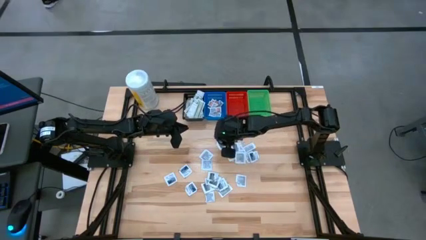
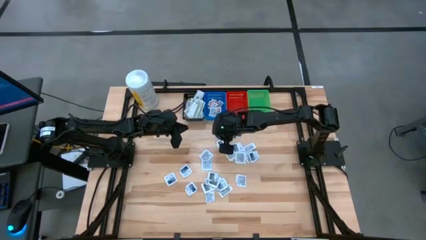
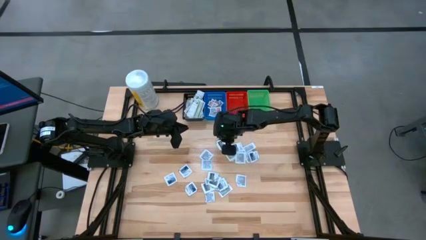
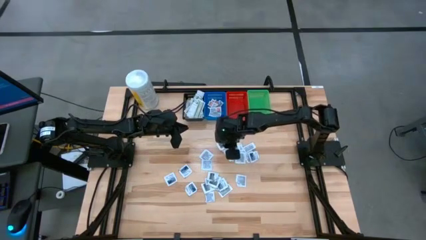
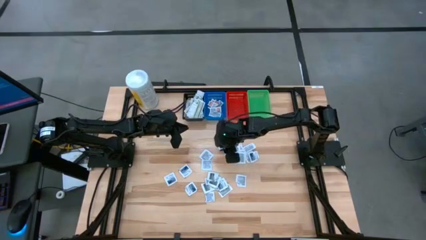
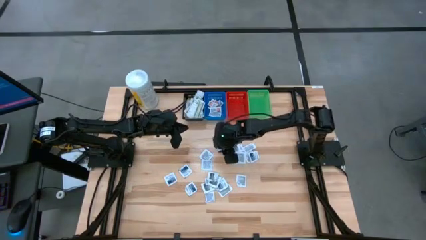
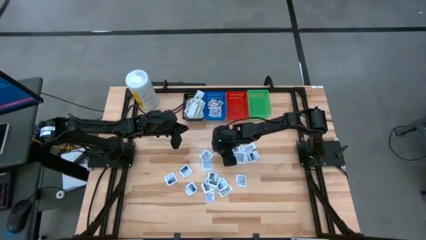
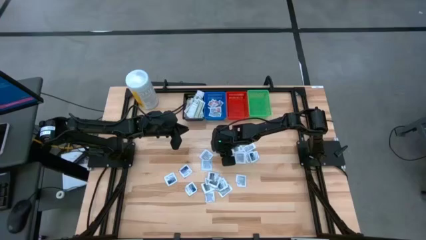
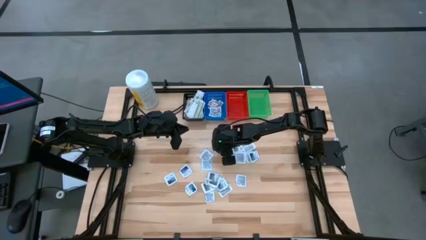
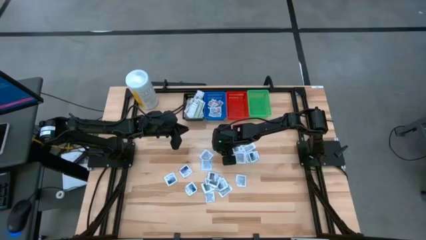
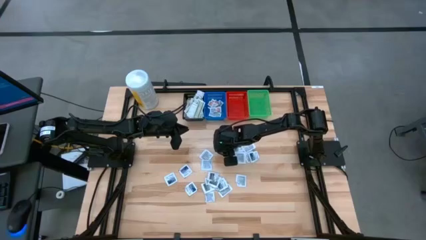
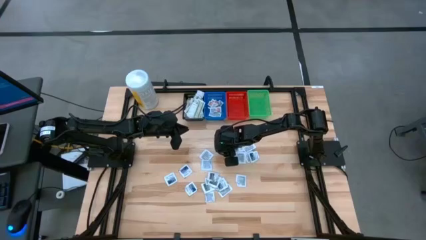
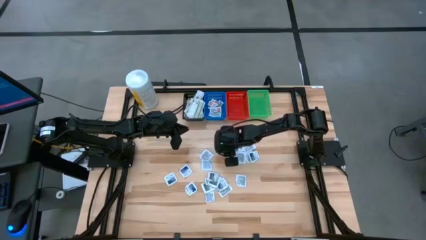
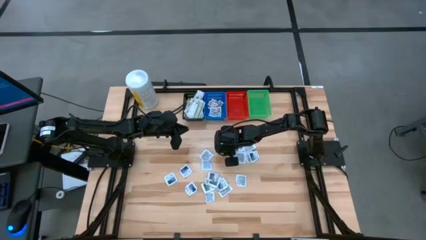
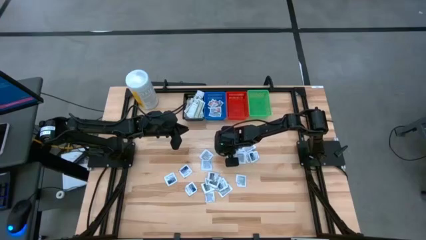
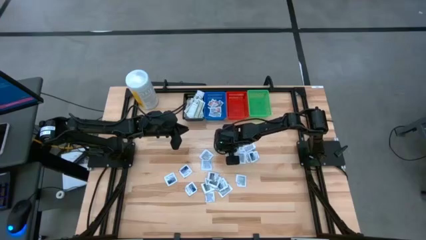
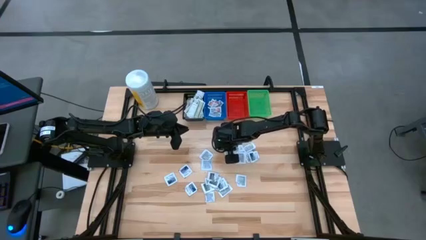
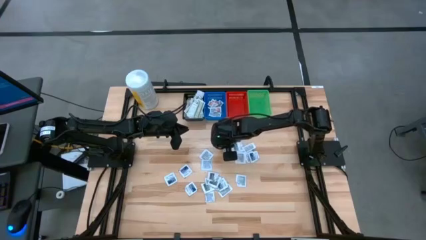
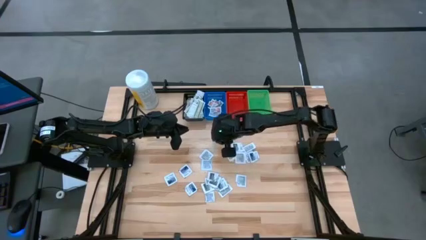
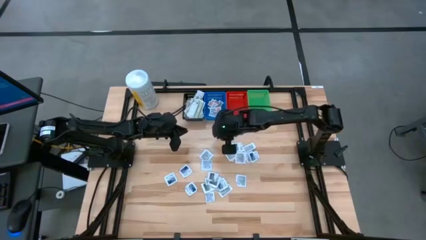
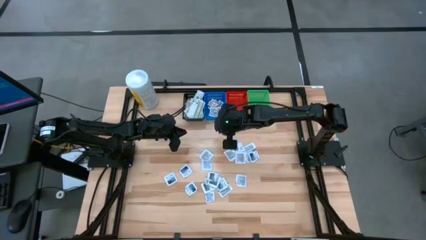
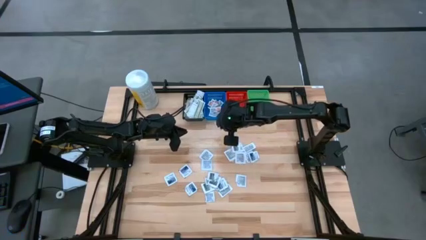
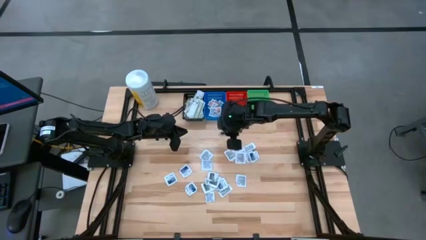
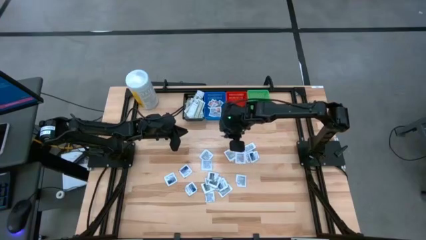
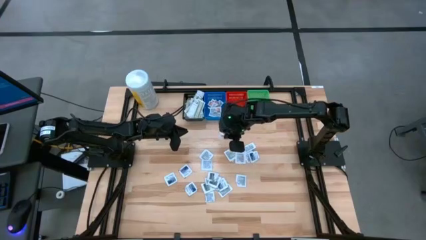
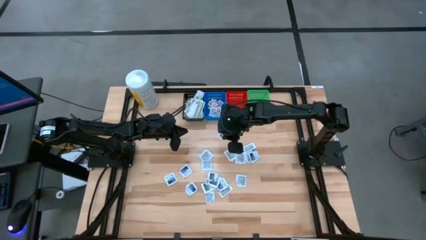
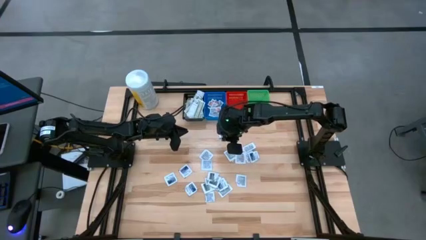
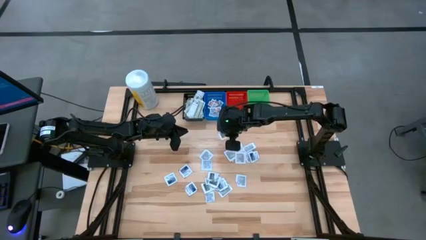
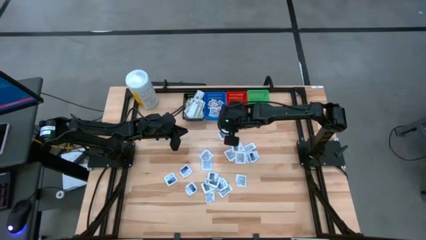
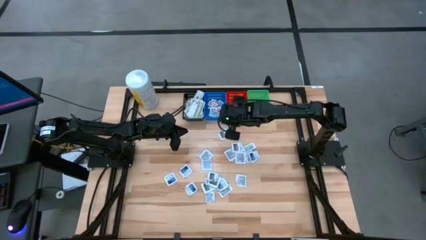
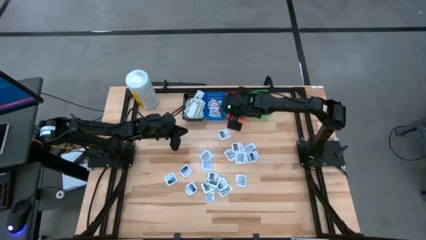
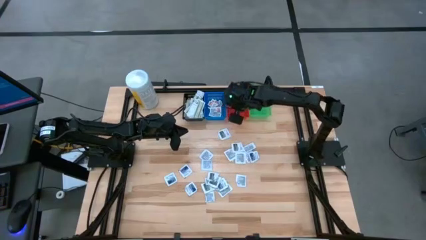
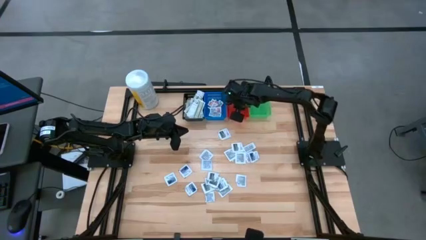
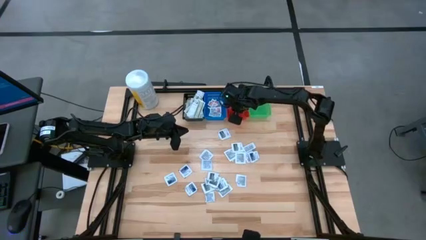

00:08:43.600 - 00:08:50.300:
Task: Pick & Place First Aid Supplies
Put the gray towelette pack in the red bin

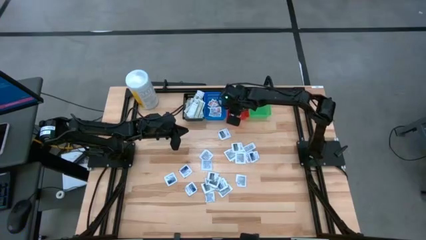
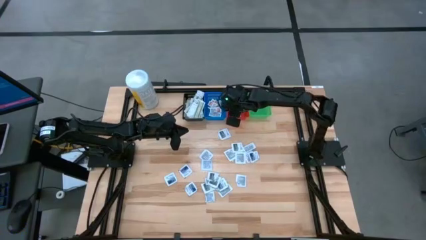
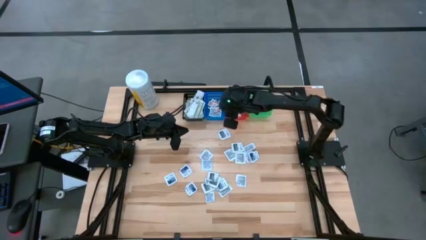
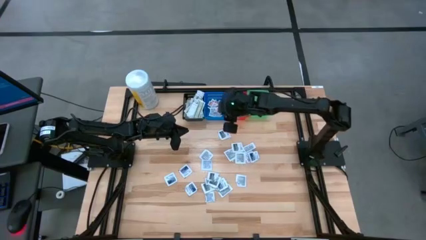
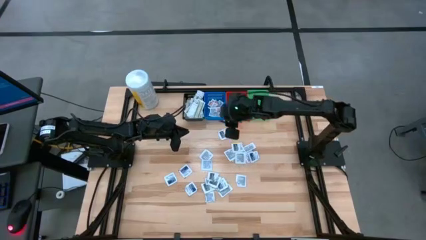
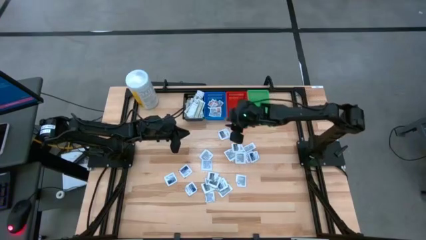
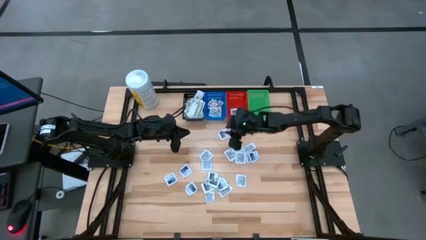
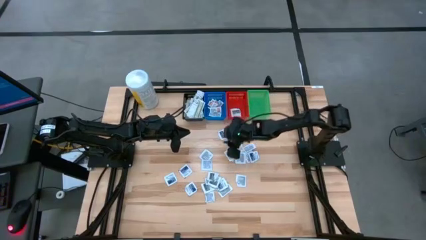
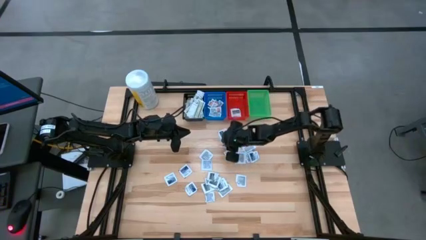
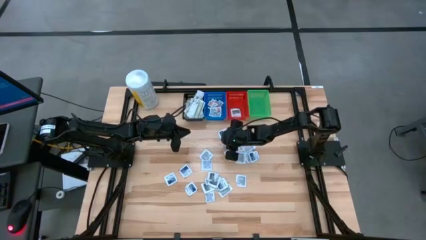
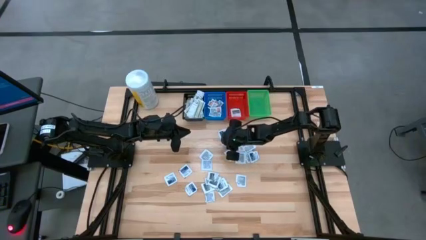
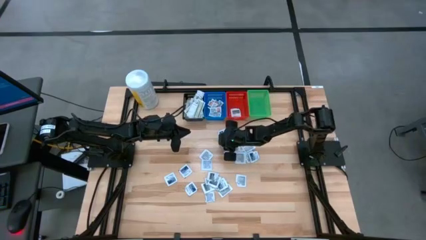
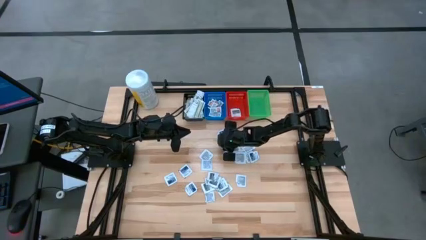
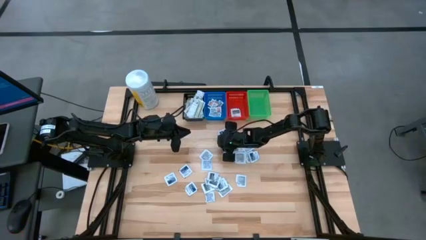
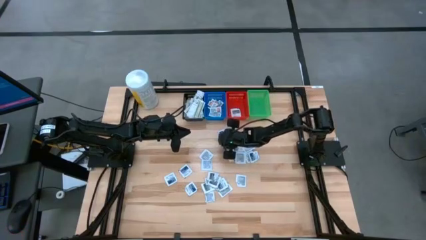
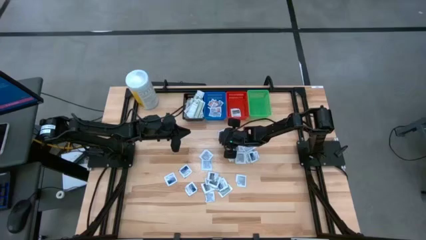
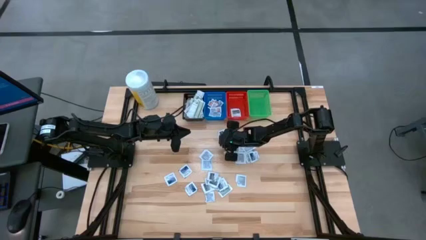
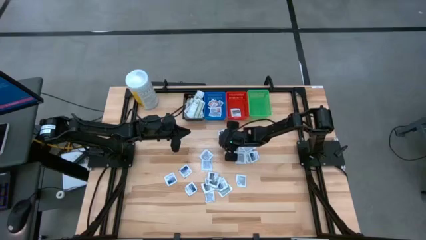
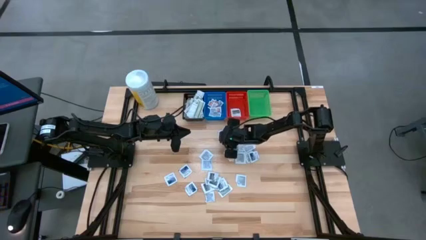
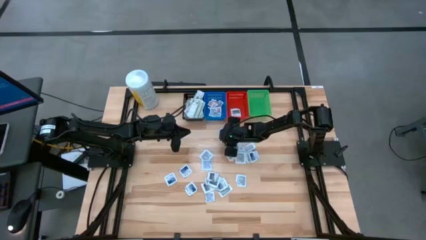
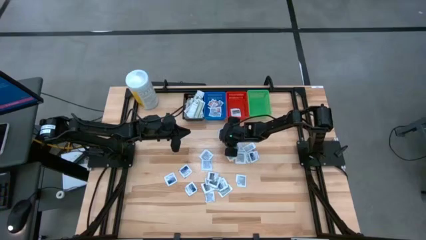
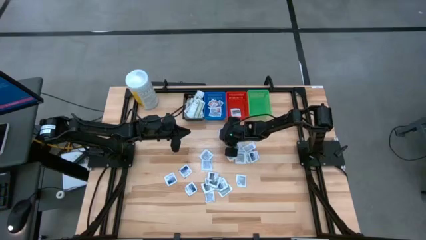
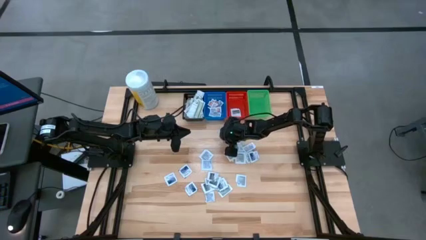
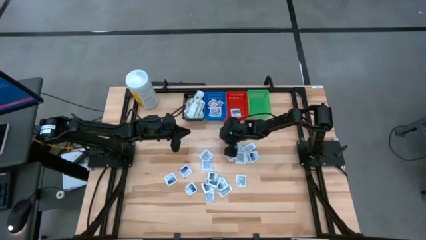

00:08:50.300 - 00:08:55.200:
Put the gray towelette pack in the red bin

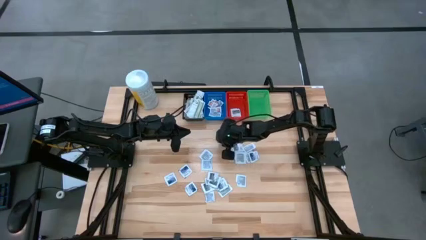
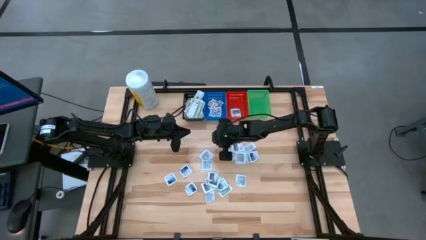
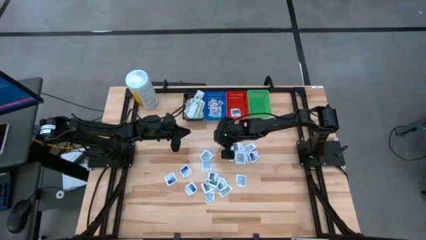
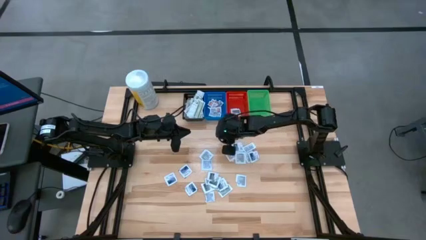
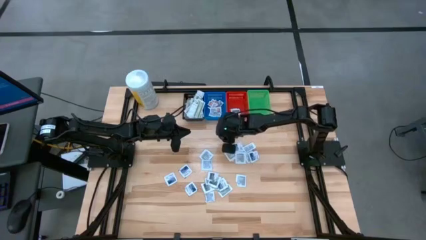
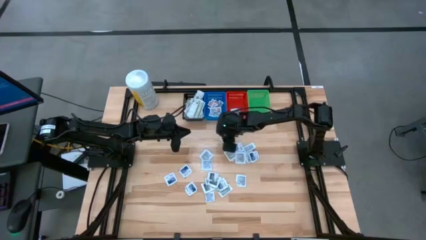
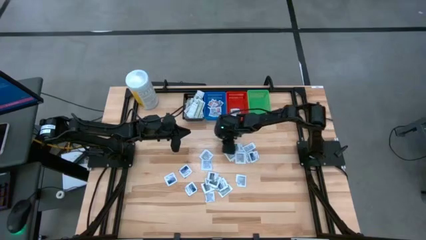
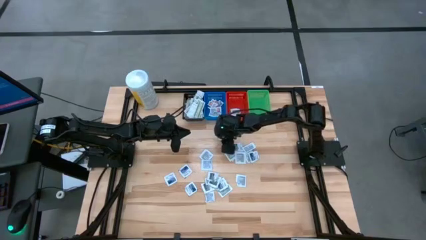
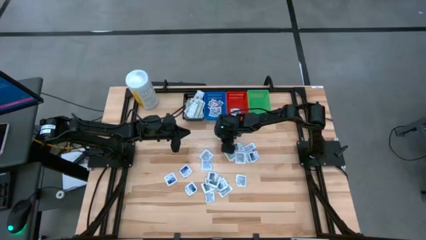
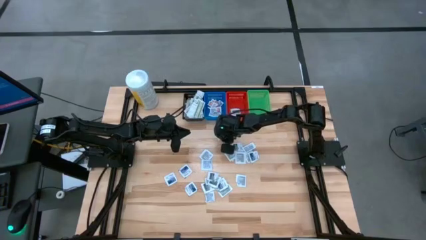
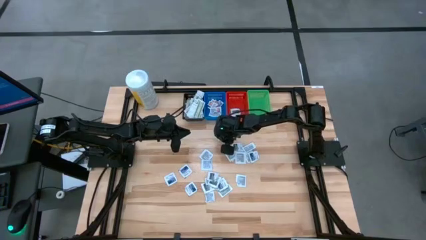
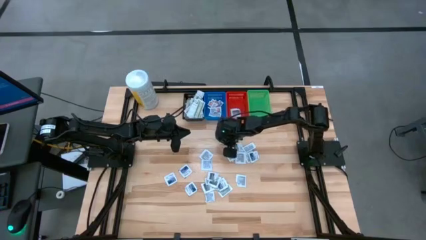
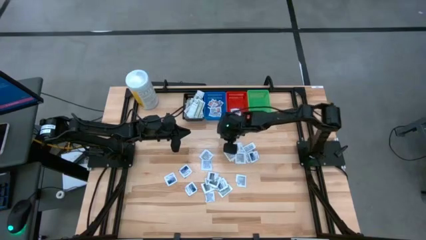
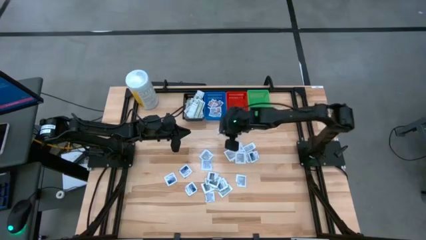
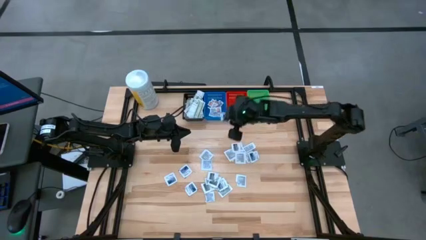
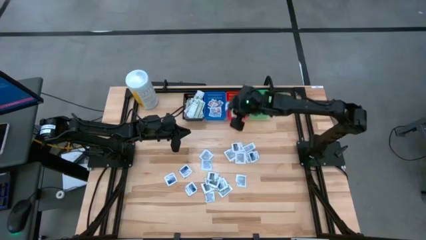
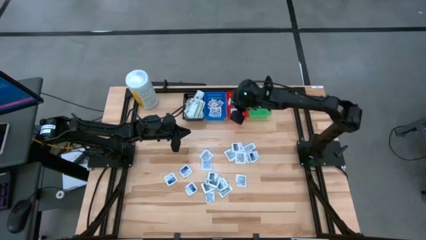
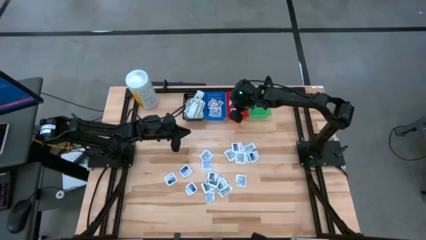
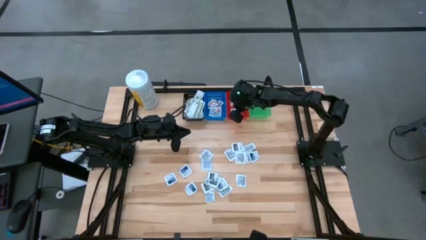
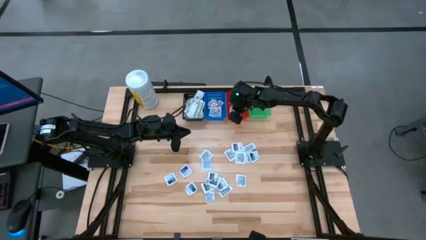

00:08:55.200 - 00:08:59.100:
Put the gray towelette pack in the red bin
